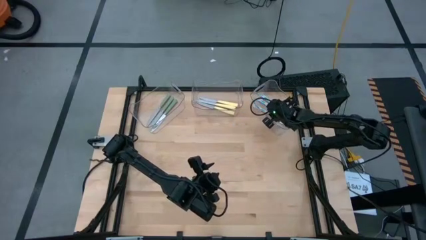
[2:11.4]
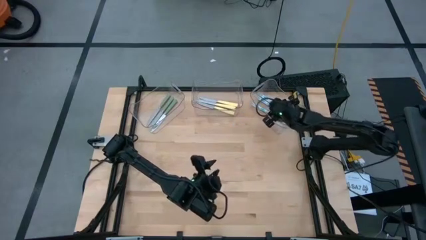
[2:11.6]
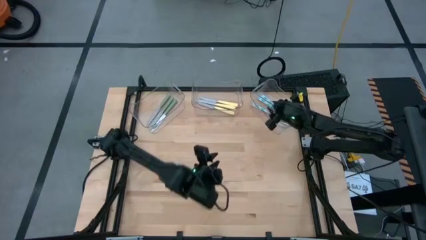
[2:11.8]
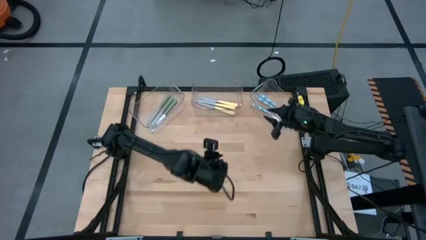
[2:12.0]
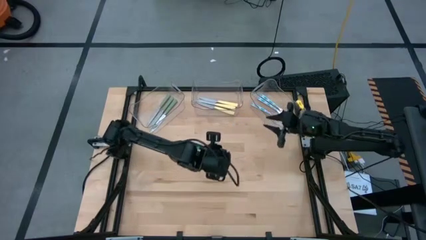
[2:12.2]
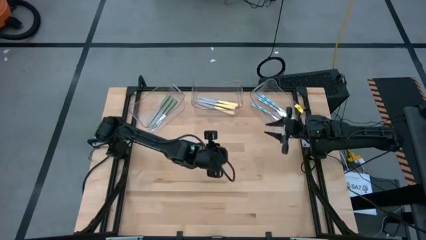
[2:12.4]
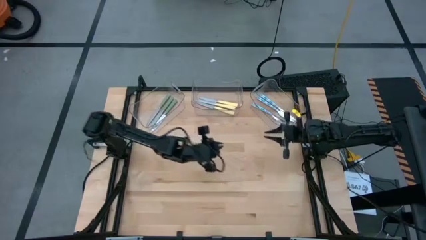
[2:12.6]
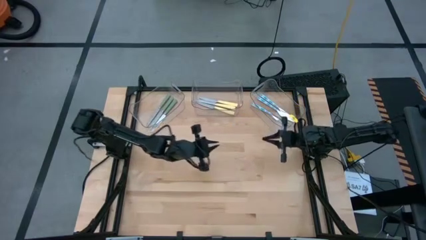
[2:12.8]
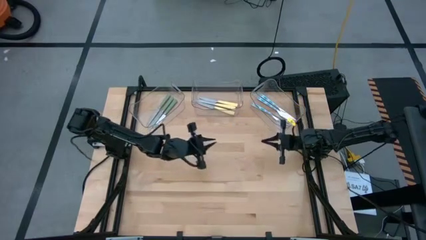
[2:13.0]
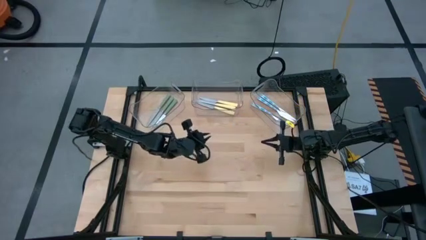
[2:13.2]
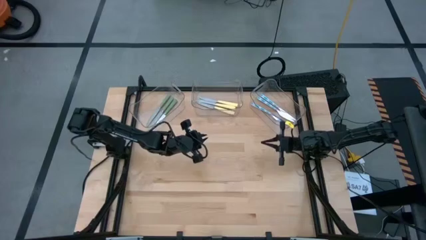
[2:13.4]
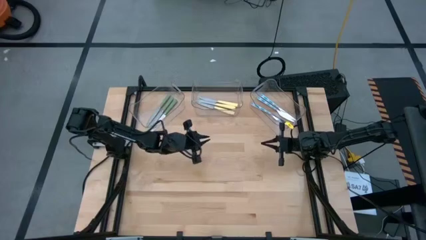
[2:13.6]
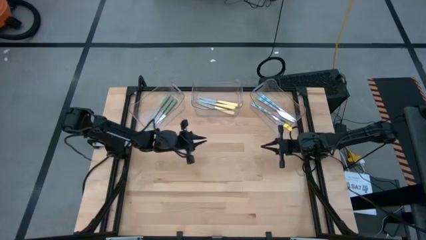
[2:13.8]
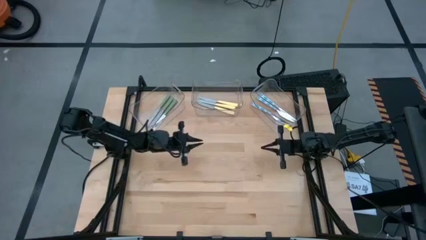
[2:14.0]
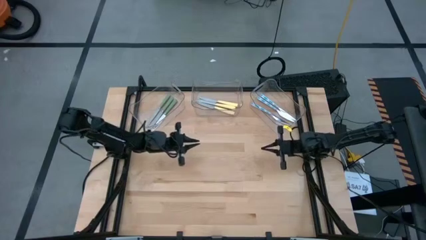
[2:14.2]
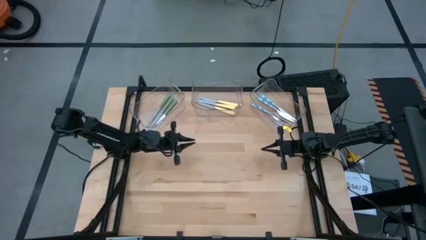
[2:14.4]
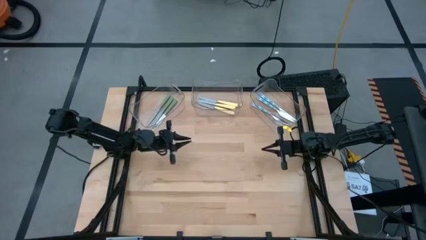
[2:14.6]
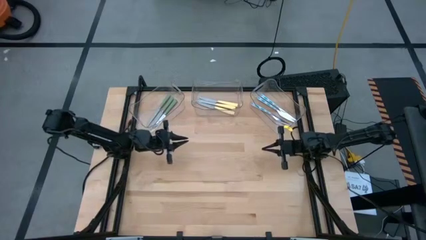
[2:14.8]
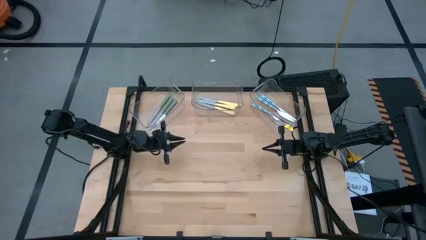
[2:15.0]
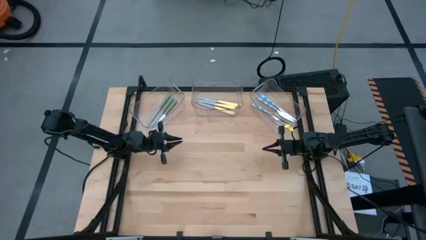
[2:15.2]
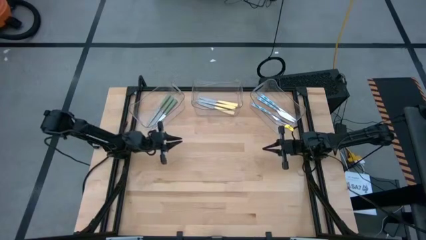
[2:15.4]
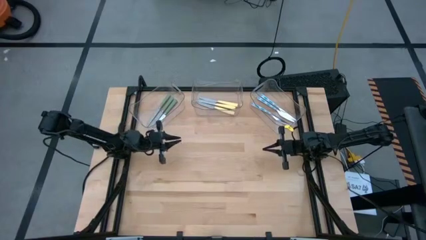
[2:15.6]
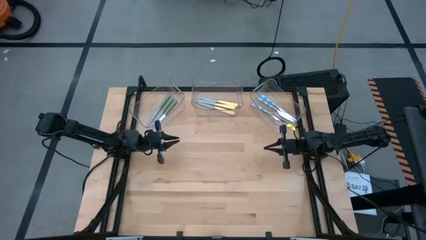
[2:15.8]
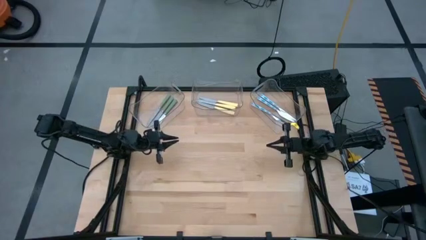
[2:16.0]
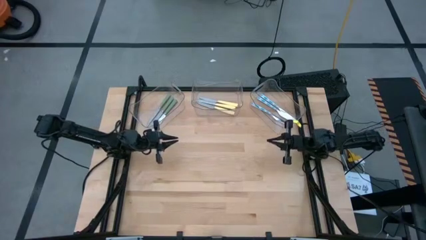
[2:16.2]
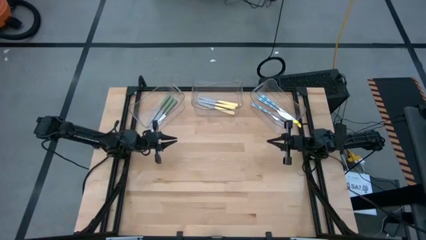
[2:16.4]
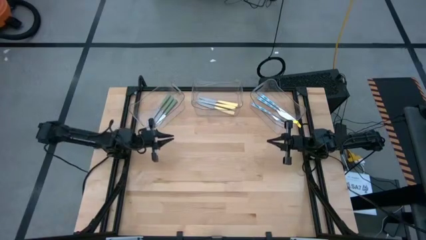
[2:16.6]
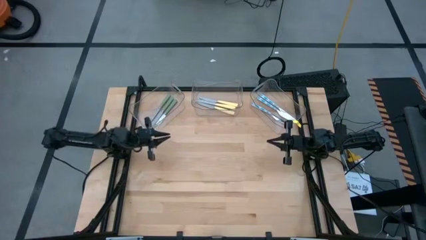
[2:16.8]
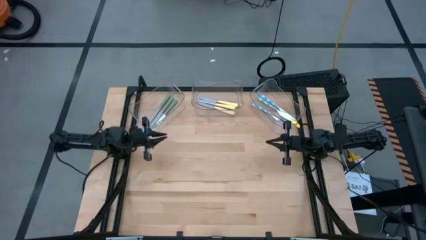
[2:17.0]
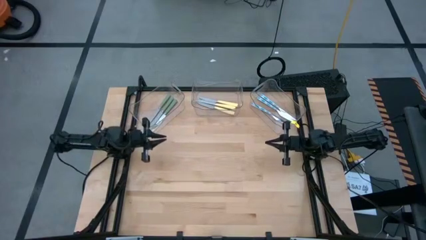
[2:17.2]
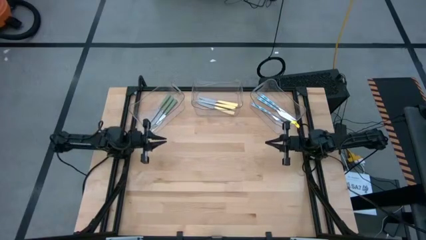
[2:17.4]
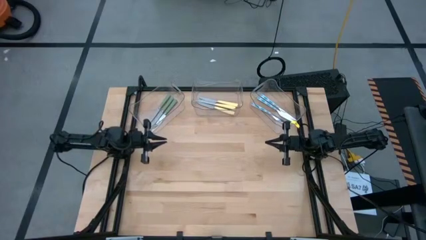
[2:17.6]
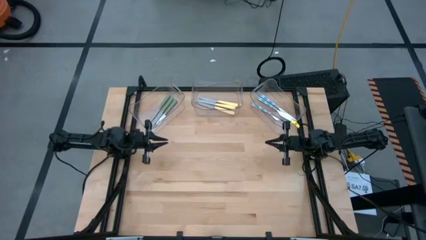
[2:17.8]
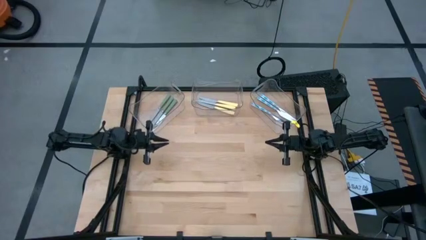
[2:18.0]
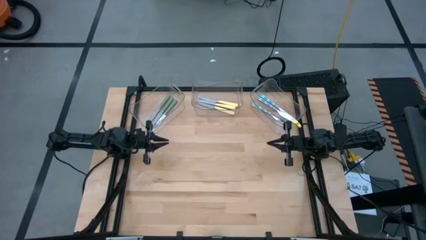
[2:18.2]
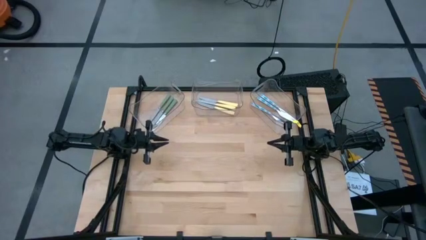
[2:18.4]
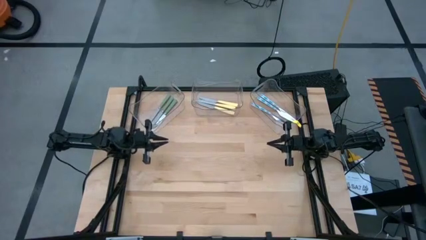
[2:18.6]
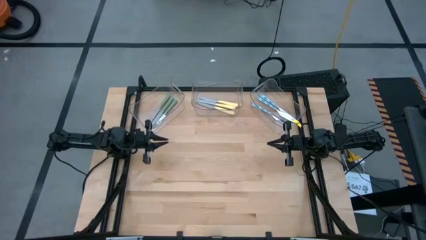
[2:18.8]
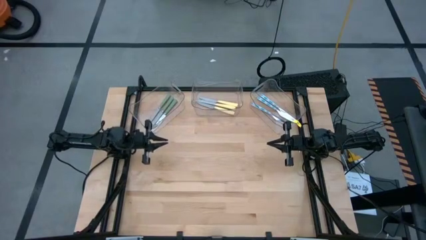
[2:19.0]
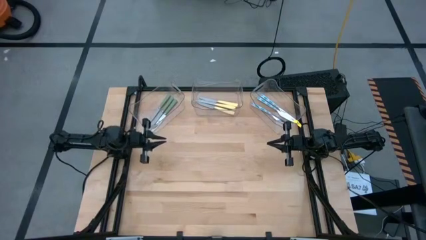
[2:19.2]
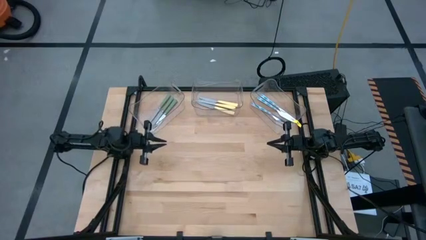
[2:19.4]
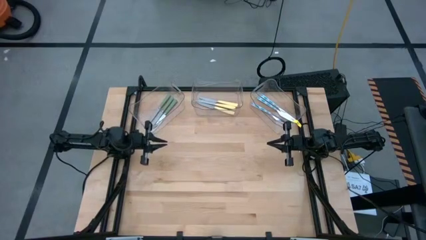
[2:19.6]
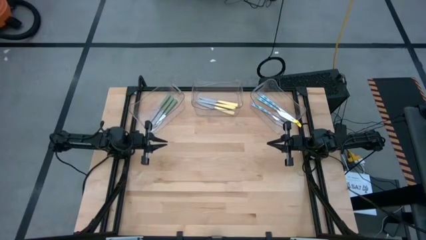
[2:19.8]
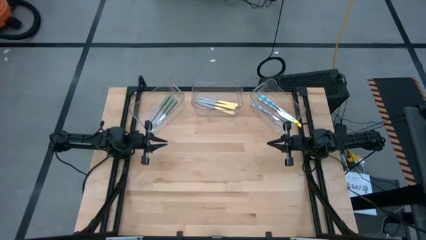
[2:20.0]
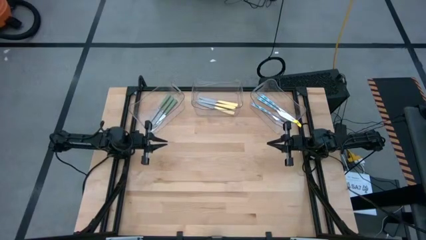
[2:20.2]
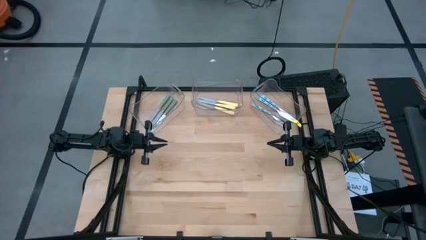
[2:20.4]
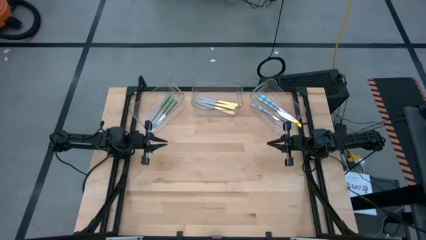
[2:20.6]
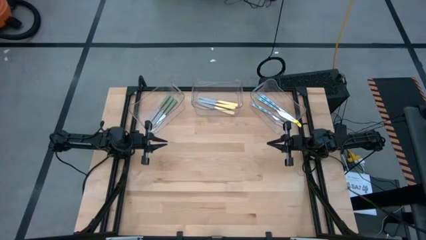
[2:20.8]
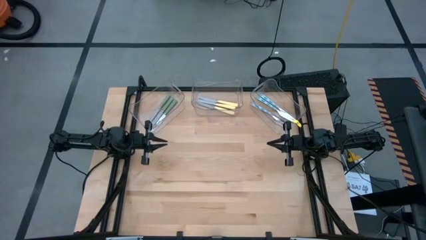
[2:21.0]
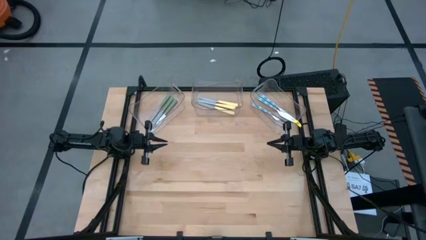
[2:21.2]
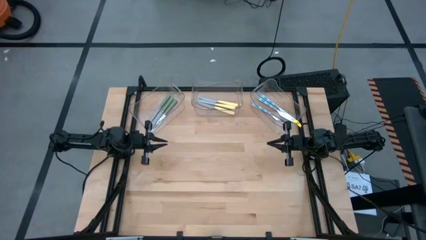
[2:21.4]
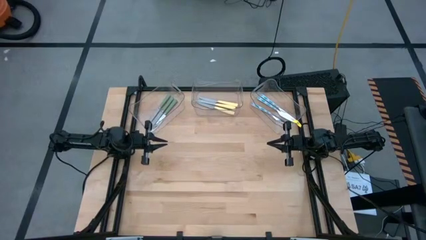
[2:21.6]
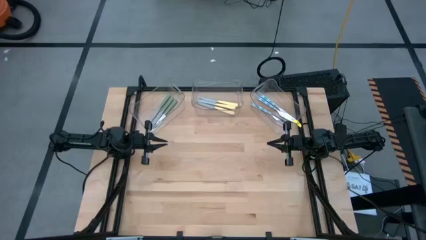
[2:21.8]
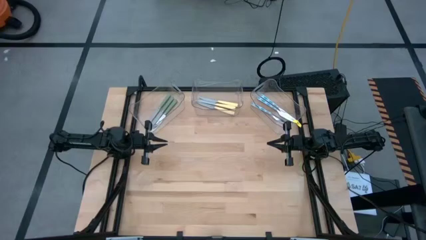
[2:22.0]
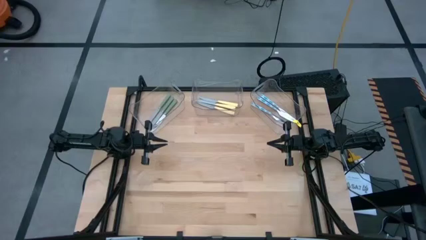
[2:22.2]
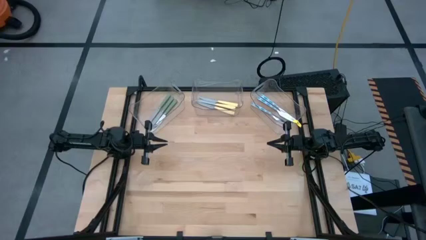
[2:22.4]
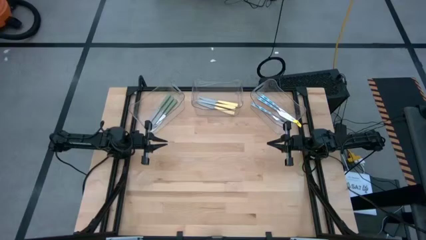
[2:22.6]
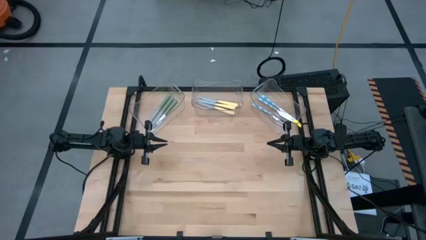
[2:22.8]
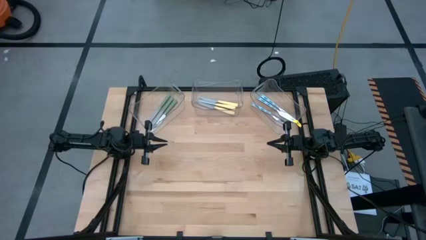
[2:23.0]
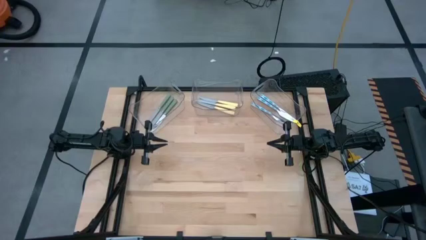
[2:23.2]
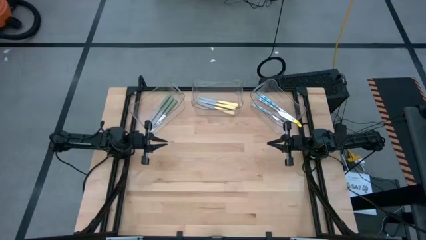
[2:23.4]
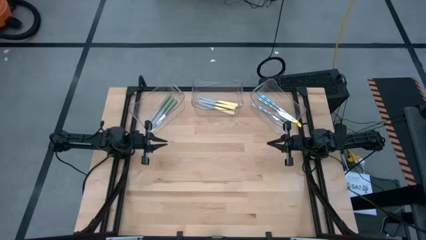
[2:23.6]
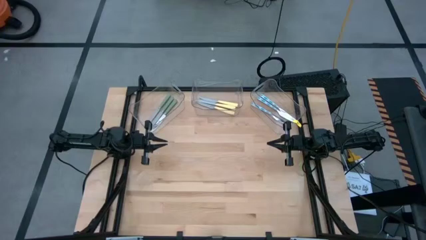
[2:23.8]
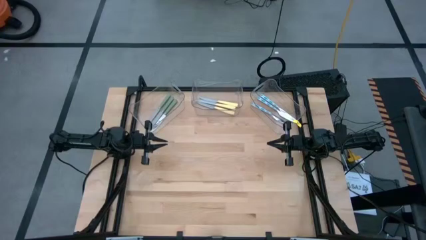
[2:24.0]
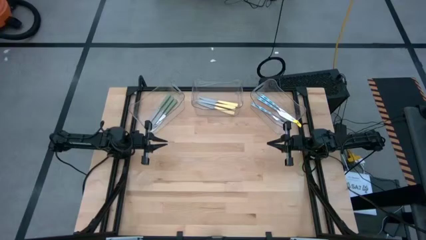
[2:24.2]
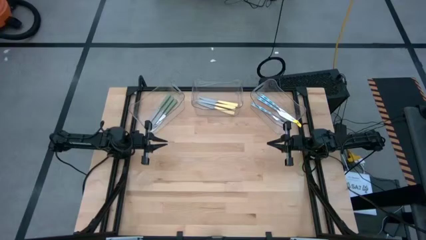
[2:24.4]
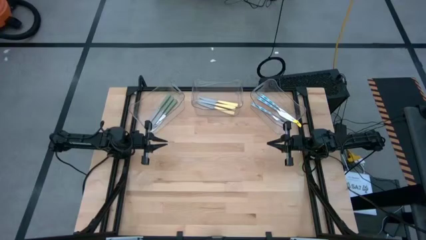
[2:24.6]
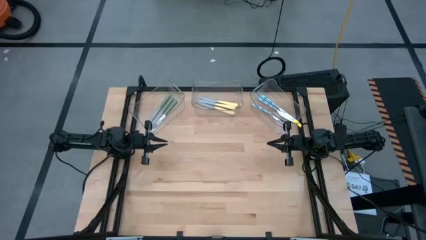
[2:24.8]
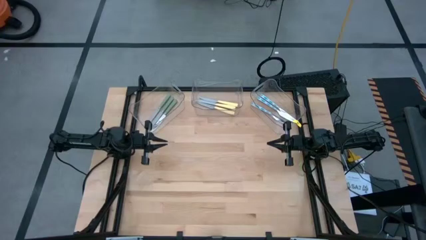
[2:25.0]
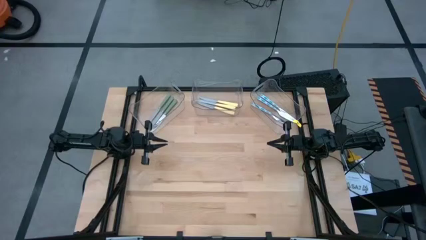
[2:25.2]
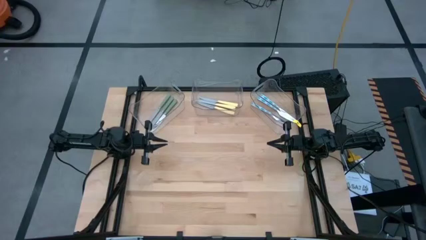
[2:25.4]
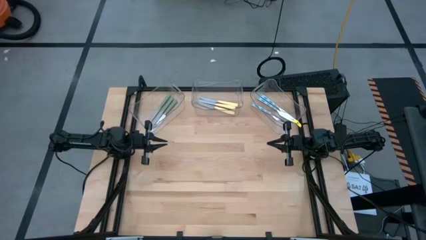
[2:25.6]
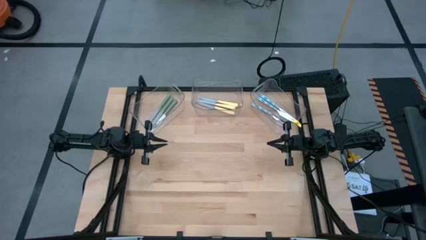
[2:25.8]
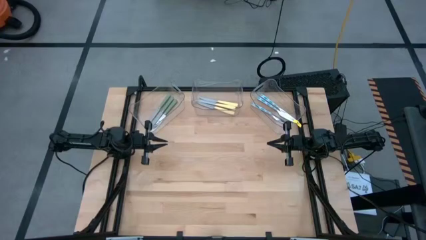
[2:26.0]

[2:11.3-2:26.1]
Task: Sort silverware by color (type)
Return to Home Position
